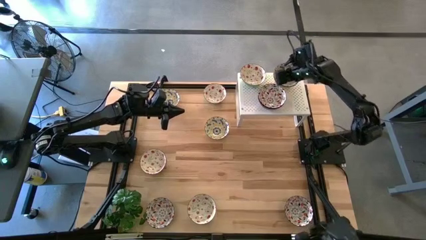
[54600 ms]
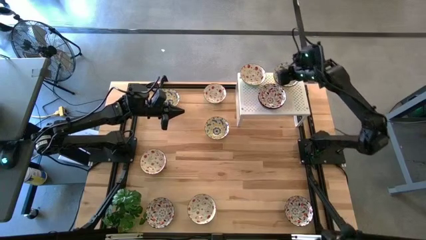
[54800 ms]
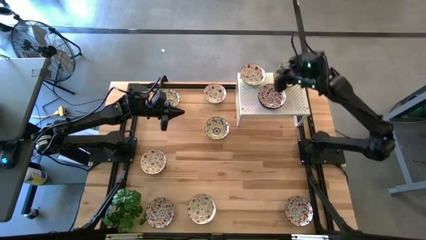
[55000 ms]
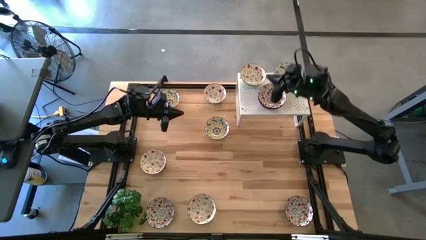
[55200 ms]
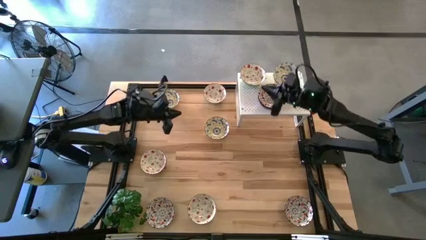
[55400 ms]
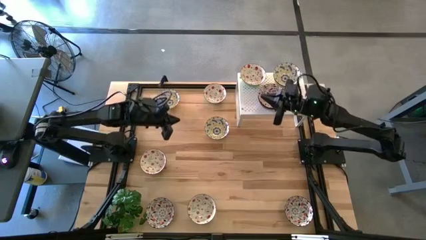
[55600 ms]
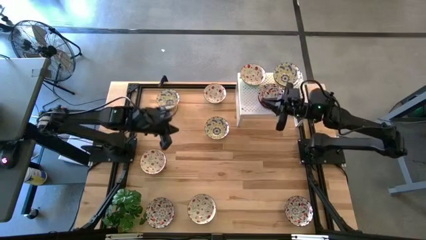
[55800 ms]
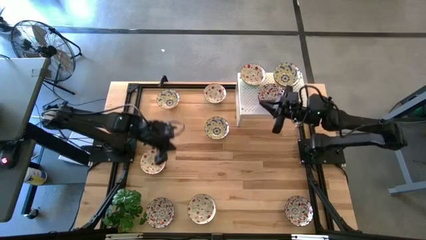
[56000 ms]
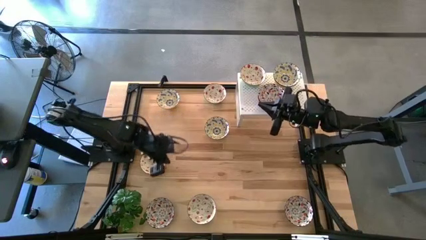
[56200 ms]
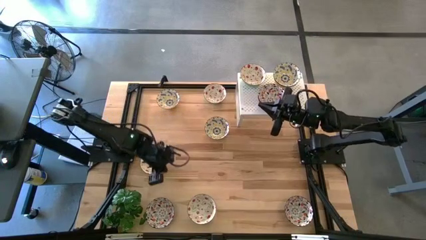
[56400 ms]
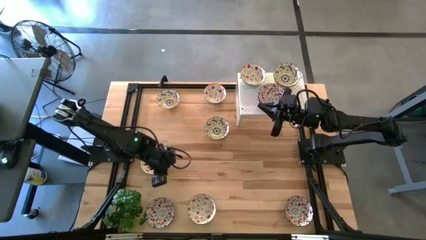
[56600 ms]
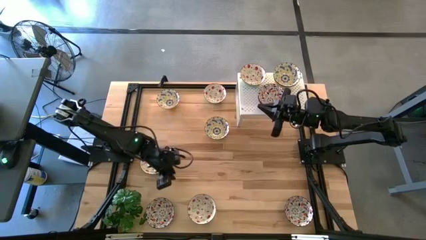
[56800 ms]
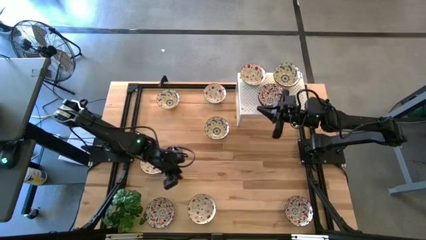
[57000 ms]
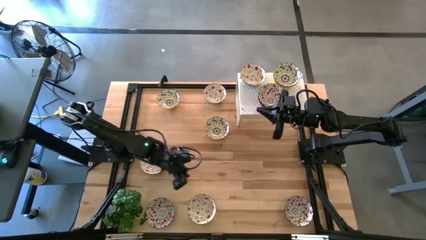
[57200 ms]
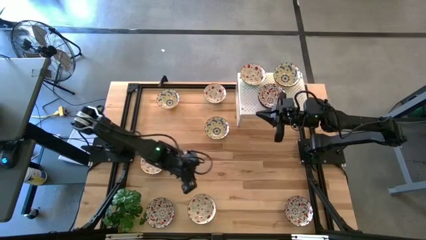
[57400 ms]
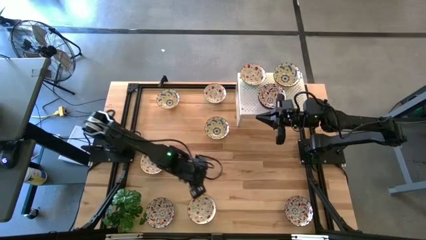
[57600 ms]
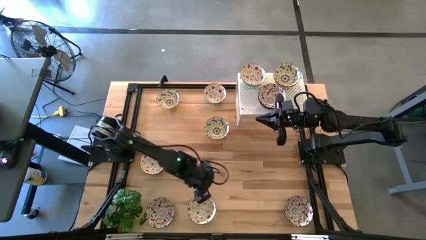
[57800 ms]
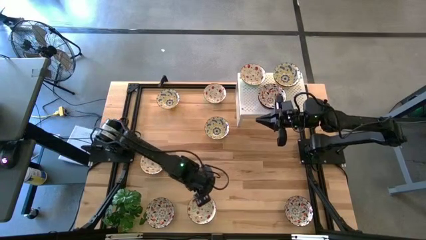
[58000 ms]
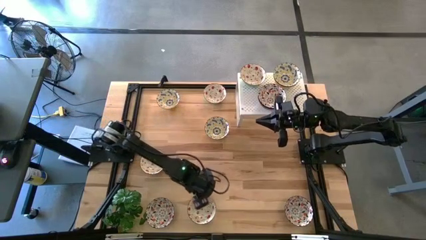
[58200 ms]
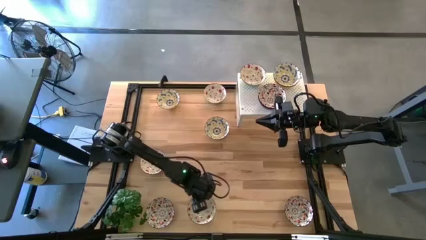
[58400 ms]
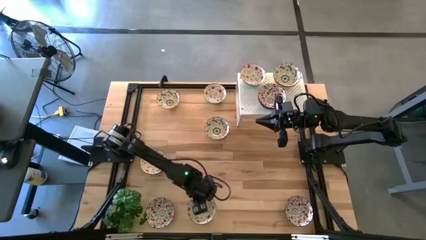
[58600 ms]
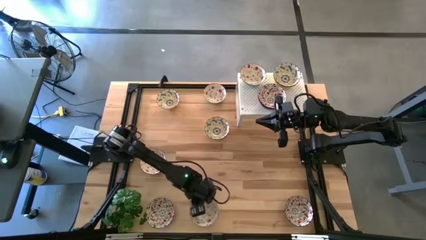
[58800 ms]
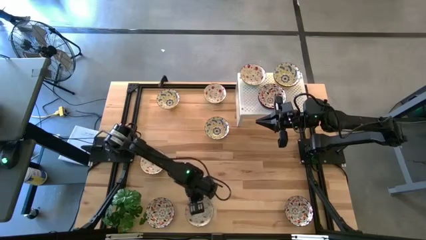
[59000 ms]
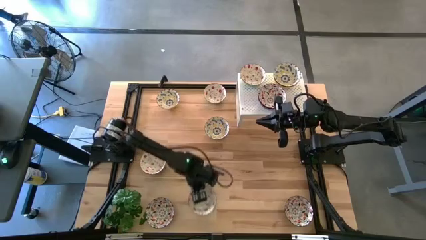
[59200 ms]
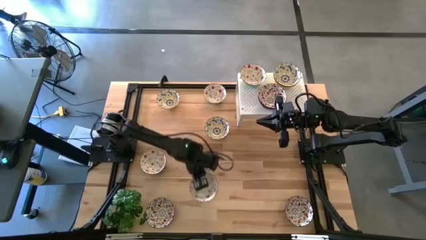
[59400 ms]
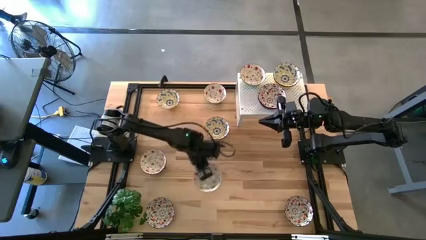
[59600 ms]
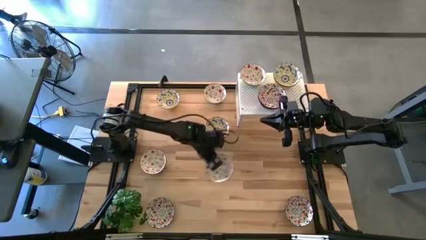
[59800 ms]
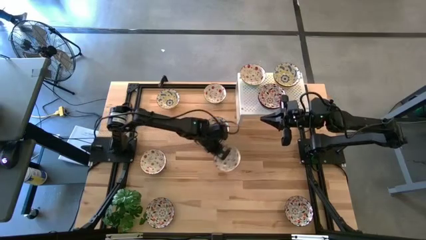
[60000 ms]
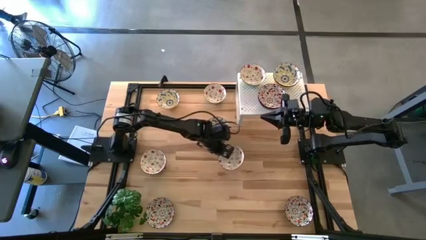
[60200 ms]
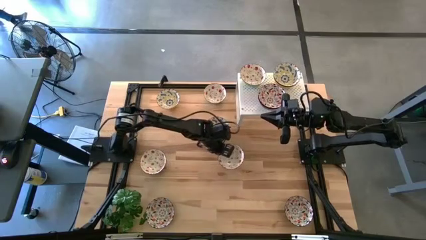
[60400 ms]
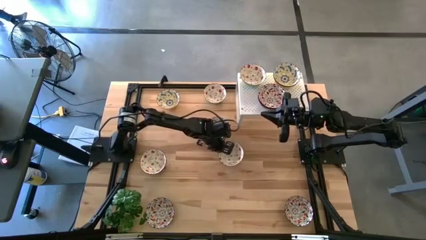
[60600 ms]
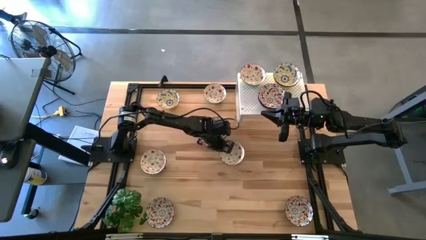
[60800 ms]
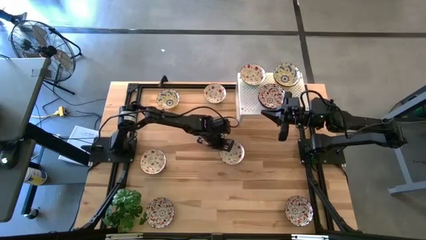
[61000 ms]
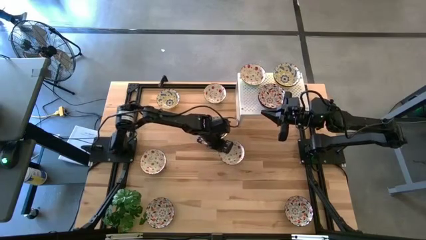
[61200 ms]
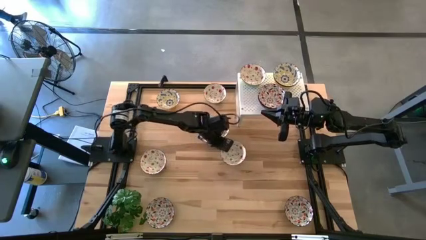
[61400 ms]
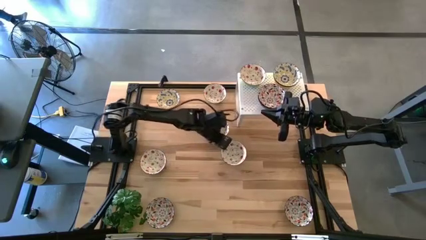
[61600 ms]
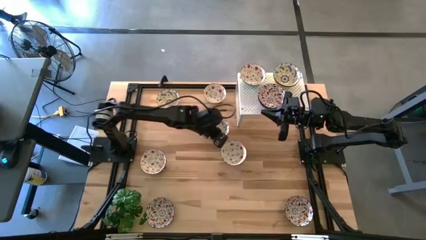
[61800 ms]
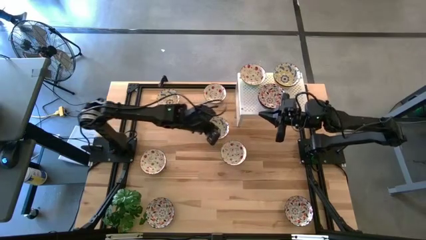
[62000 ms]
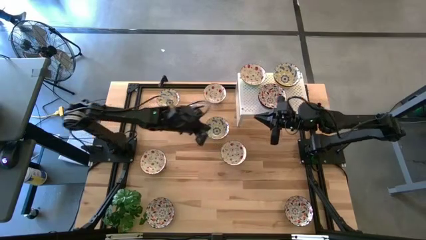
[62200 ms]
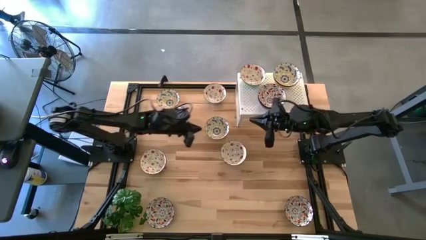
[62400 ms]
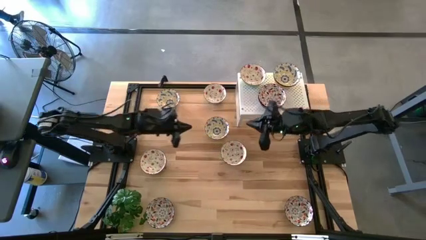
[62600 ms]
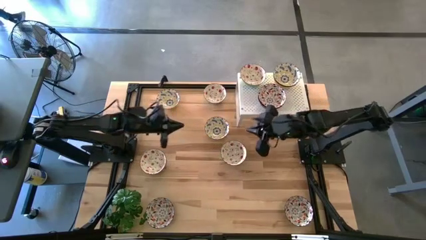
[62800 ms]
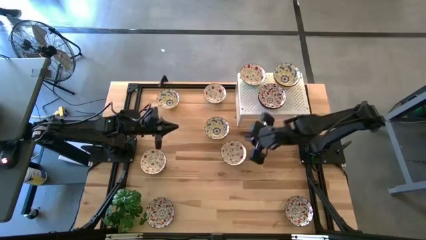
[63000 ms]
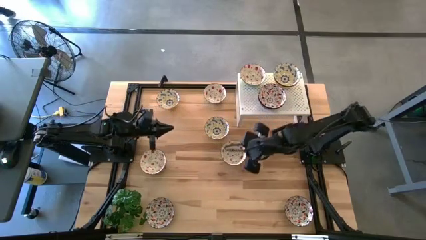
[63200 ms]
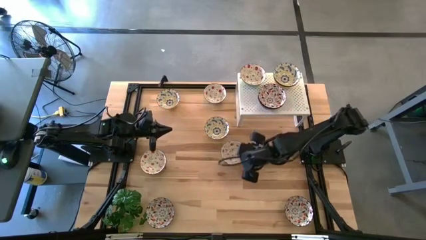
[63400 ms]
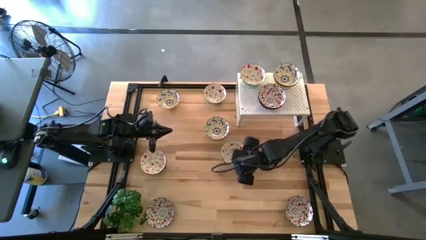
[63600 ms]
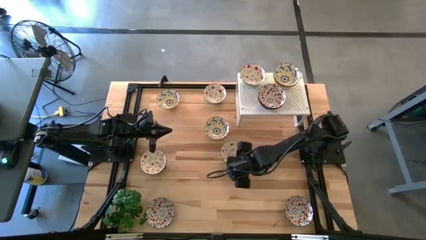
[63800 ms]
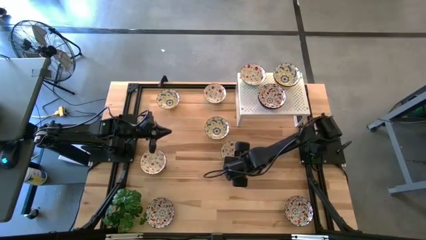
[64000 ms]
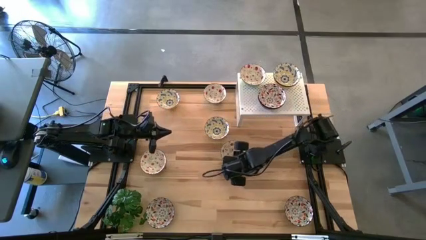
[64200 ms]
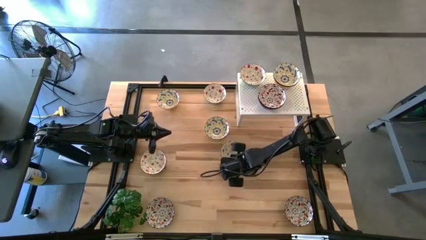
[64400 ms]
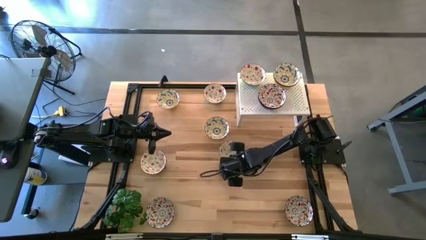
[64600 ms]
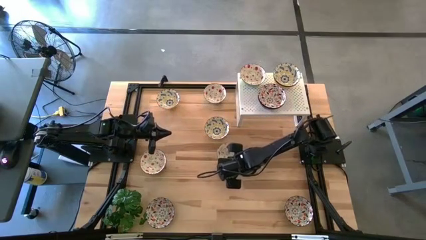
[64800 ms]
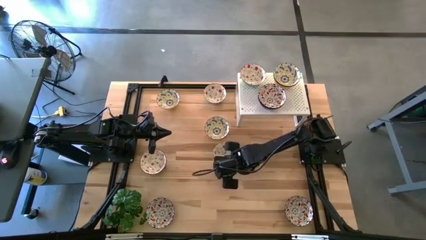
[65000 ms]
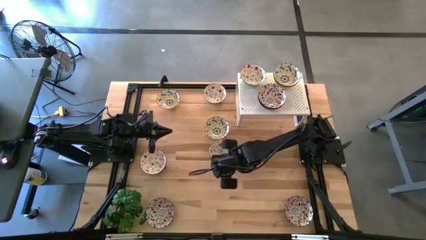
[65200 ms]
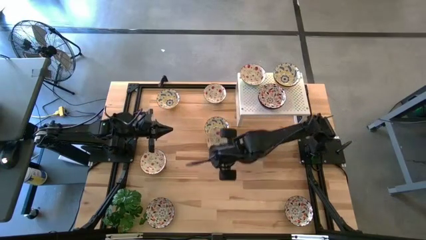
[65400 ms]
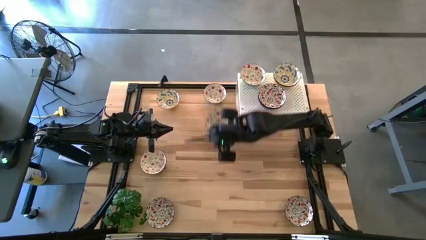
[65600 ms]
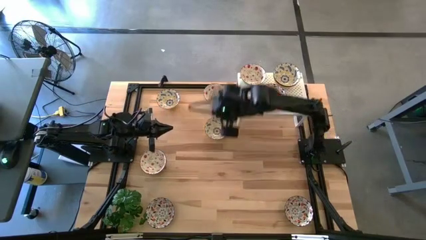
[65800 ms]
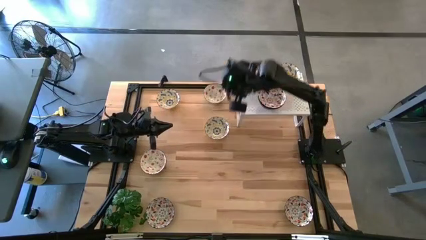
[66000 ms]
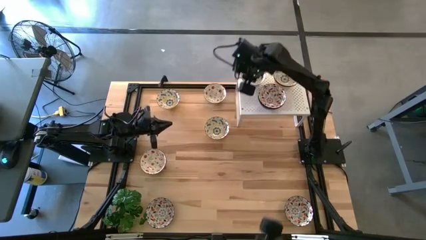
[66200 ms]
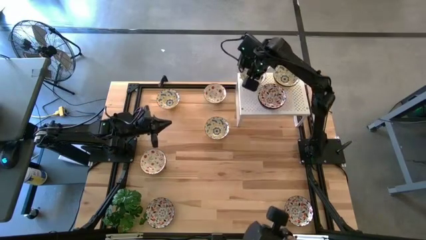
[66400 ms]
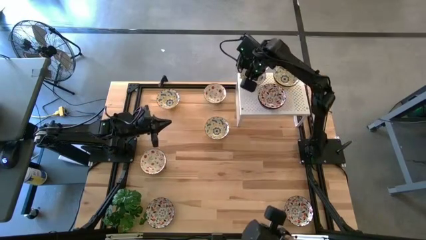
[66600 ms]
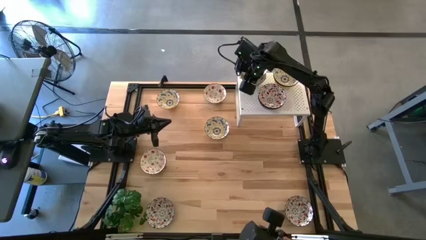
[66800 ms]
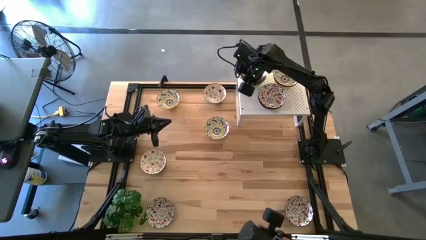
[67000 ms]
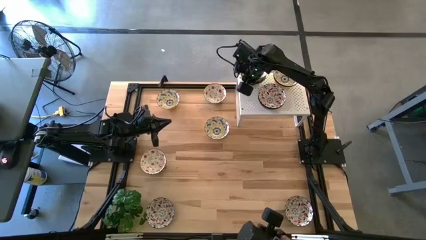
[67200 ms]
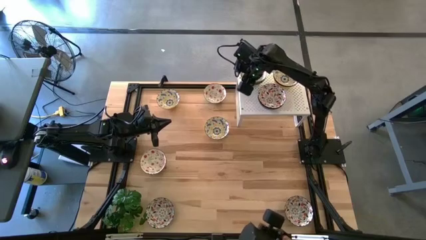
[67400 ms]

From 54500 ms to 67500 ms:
Task: Pick & Place Mini bowls
Stack the green patterned bowl on top of the green bowl on the shelf
